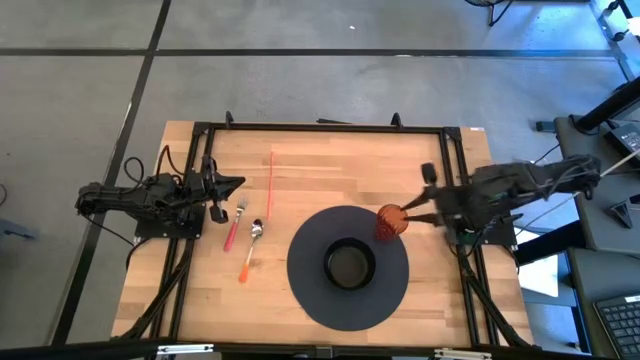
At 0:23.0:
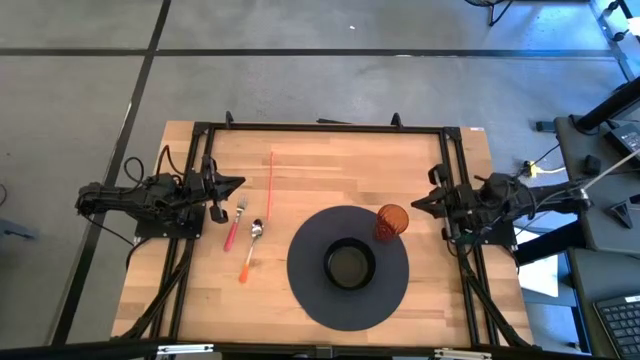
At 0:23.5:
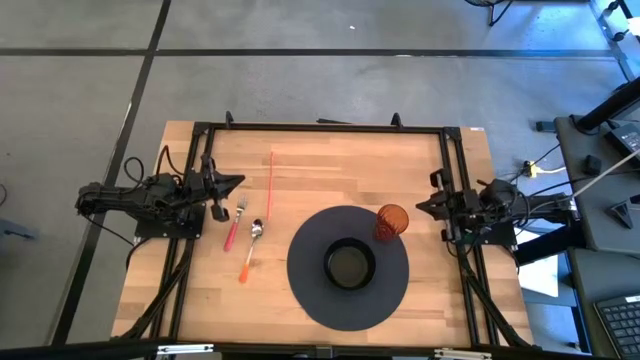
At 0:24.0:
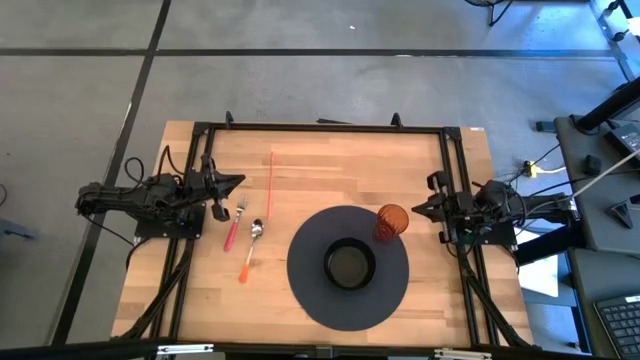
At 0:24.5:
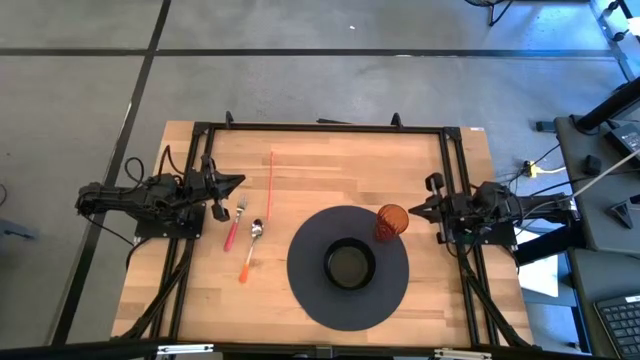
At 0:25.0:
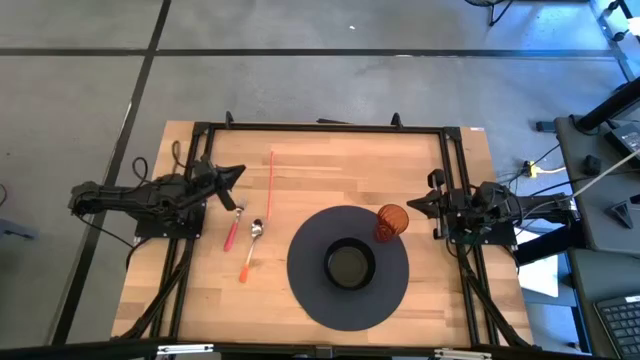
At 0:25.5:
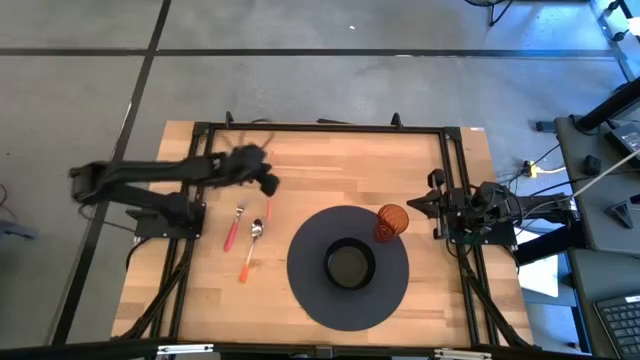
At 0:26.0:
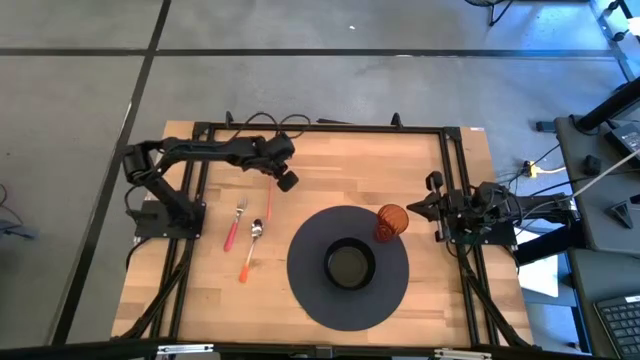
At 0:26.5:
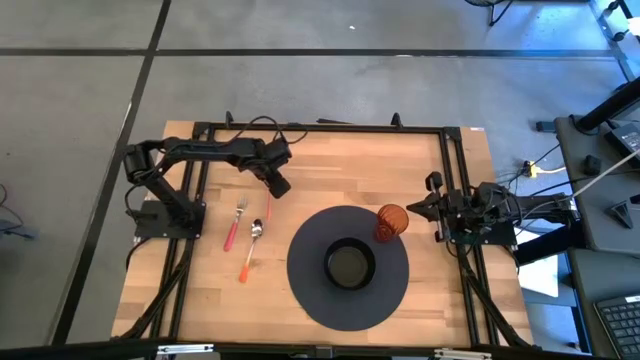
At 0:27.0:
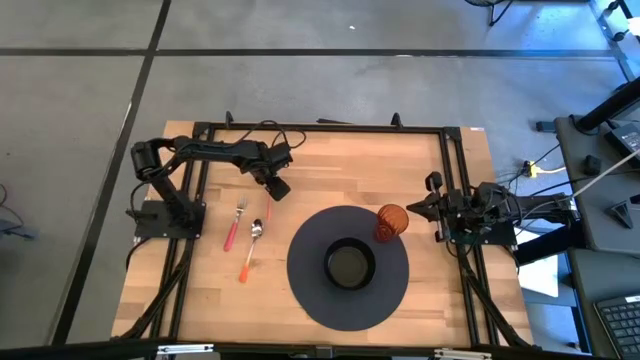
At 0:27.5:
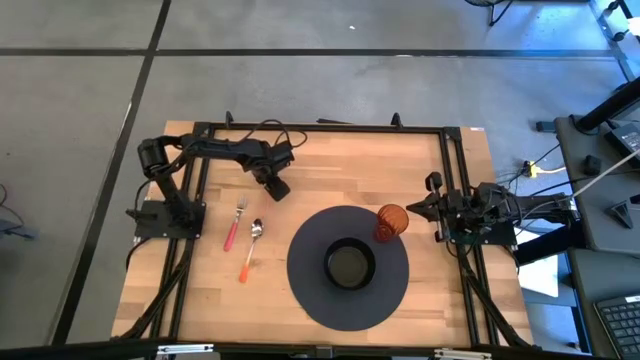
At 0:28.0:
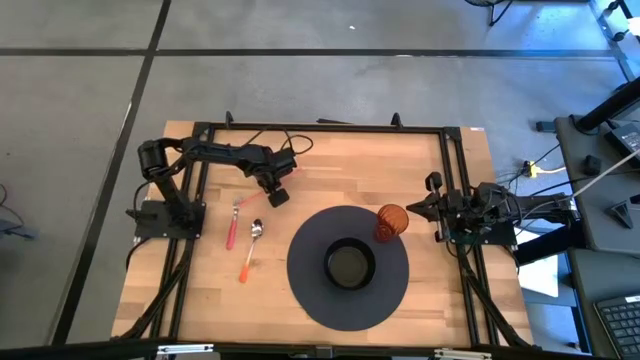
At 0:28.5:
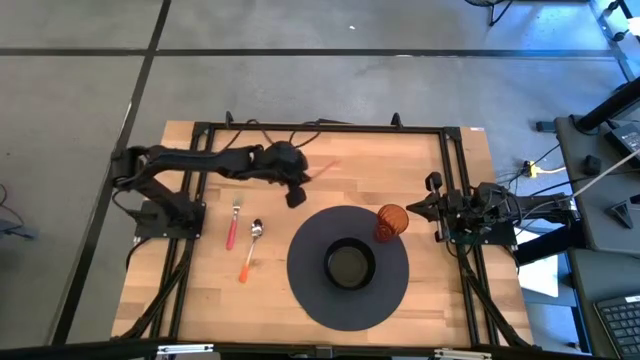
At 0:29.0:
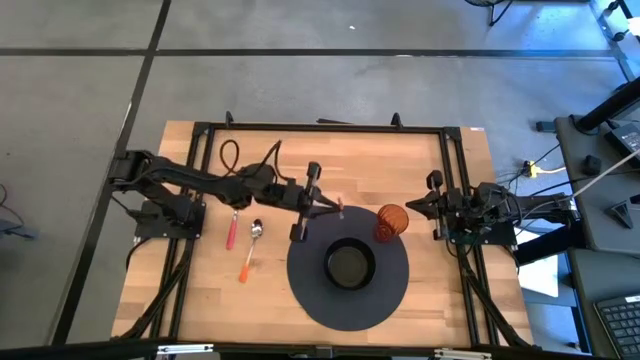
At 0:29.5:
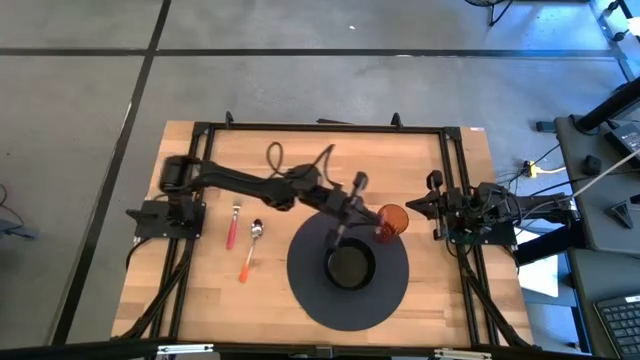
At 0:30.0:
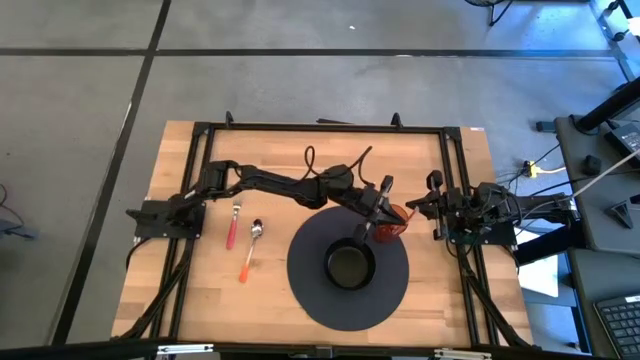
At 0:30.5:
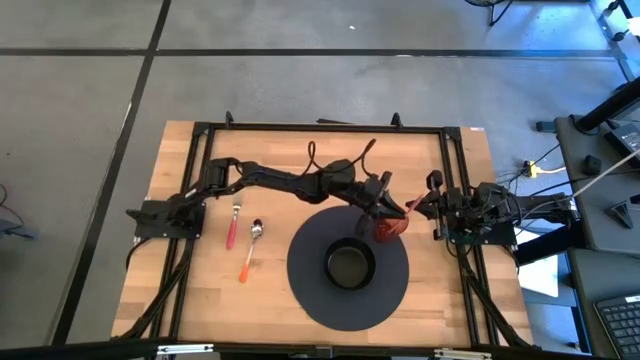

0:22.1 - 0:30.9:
Task: Pick & Place Utensil
Put the red straw into the brown glass

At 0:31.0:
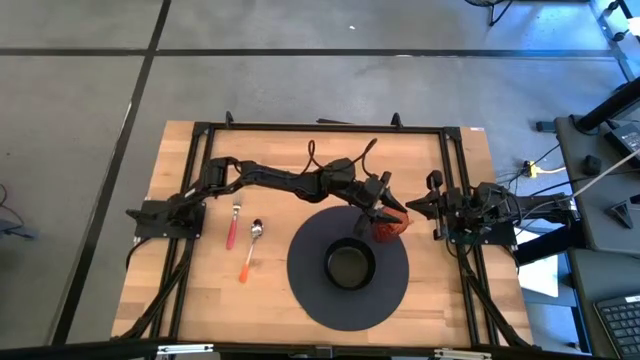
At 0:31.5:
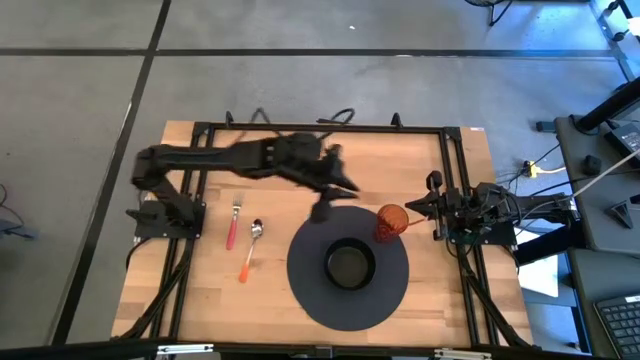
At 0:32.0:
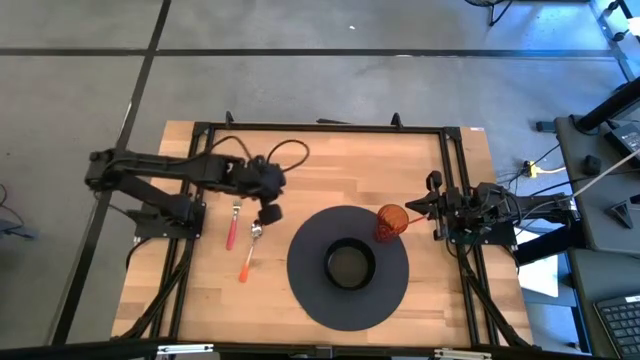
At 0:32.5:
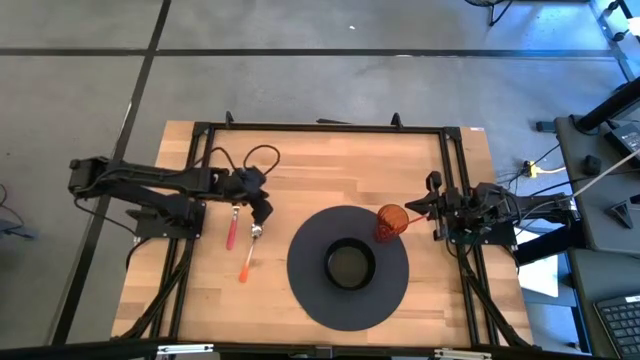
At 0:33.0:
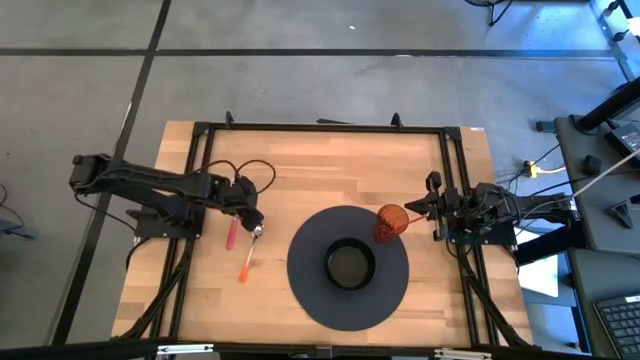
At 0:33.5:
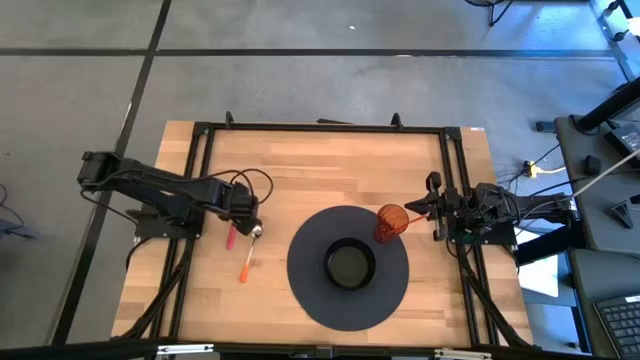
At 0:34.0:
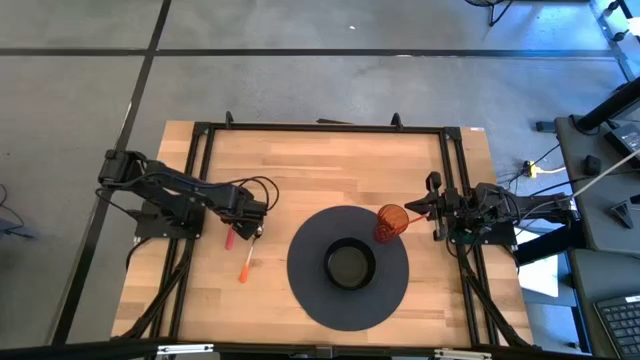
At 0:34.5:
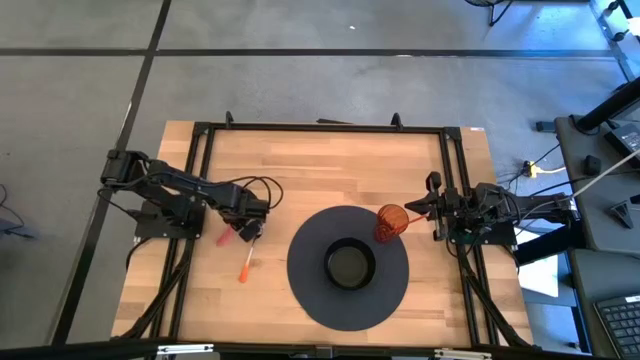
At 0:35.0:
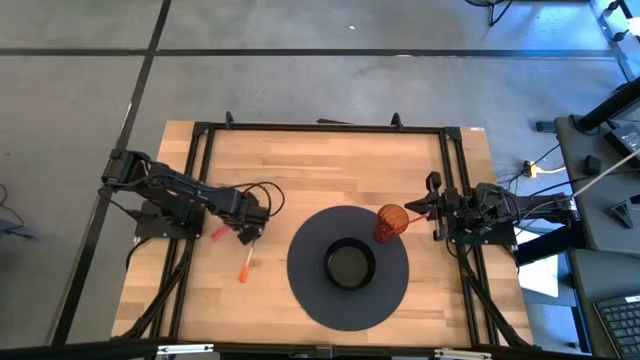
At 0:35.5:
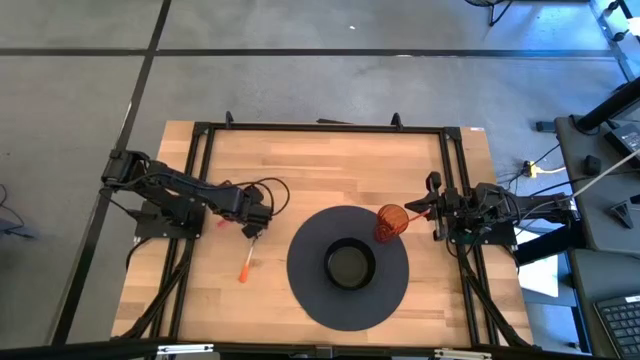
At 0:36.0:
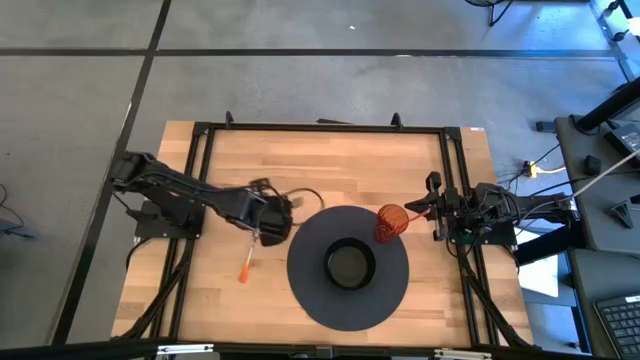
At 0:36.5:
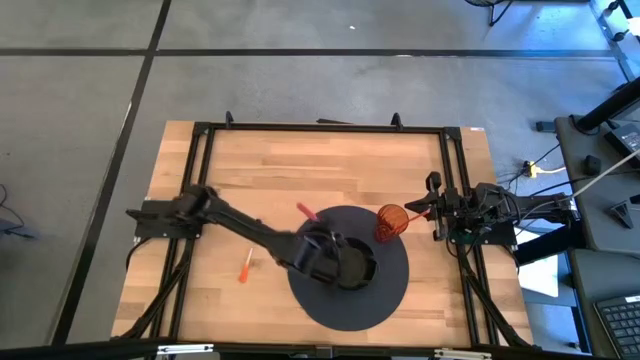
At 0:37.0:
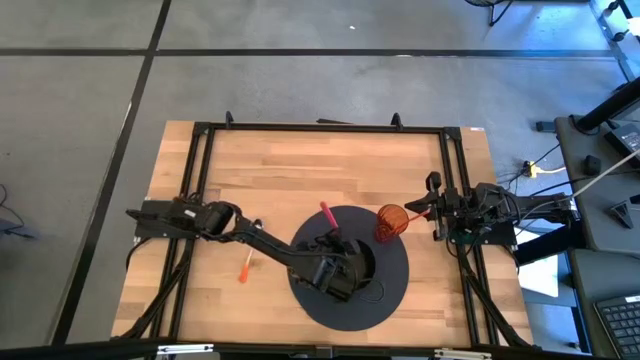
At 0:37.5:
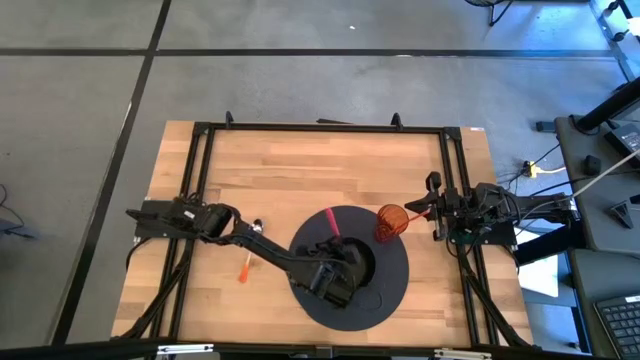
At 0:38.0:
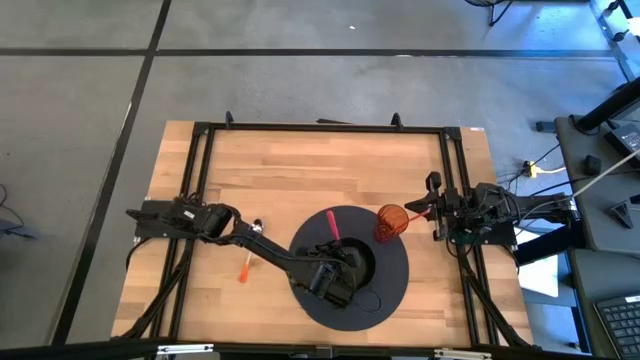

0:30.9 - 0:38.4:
Put the pink fork into the black bowl

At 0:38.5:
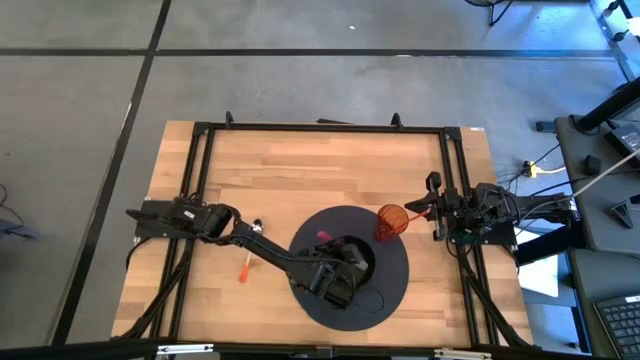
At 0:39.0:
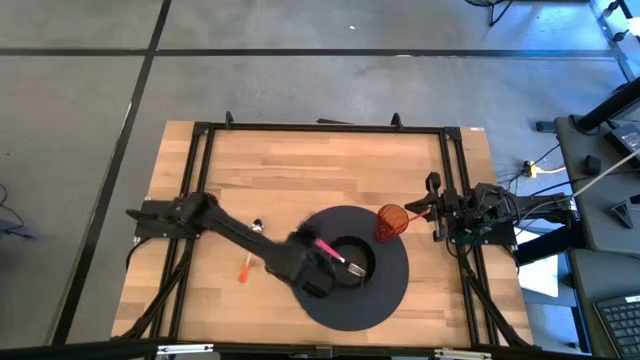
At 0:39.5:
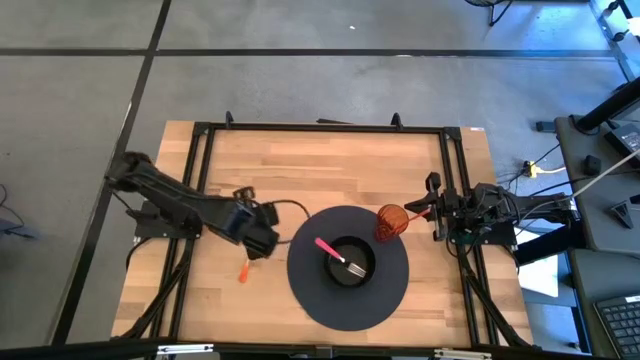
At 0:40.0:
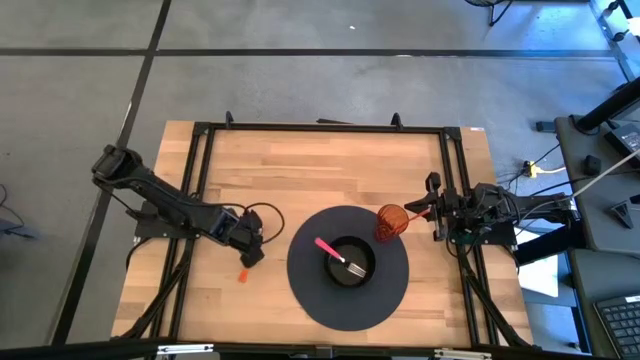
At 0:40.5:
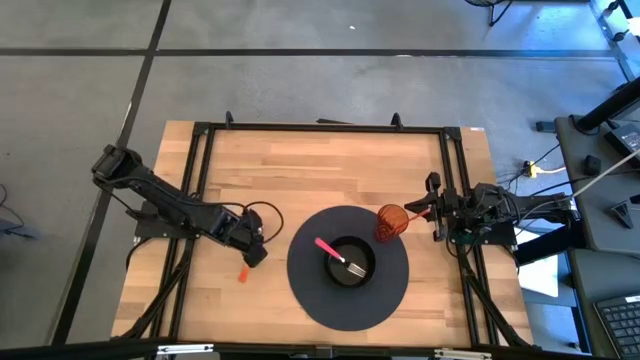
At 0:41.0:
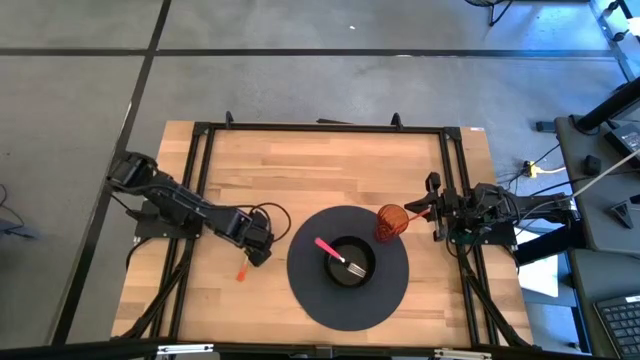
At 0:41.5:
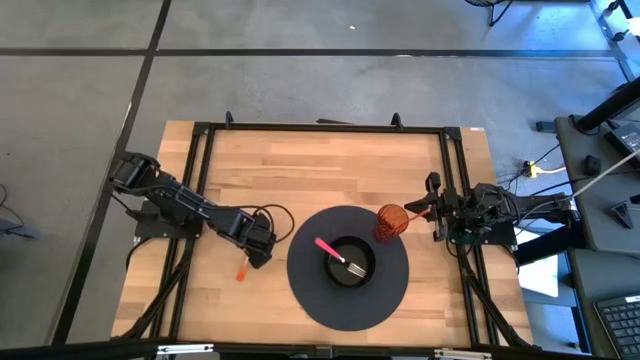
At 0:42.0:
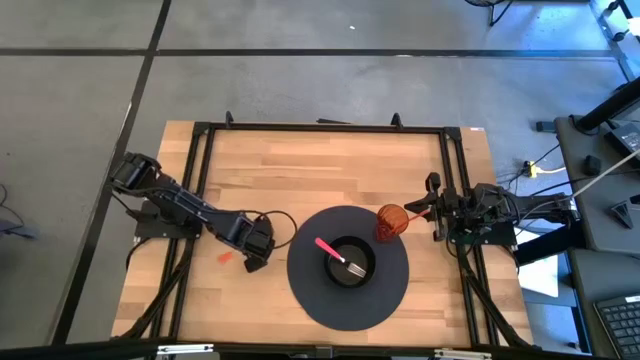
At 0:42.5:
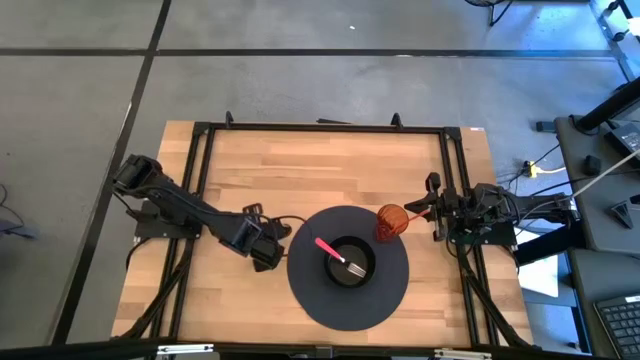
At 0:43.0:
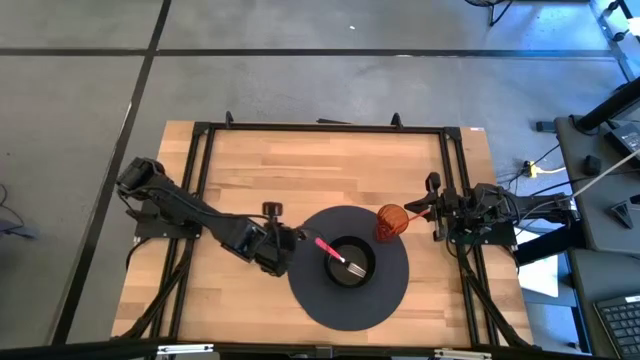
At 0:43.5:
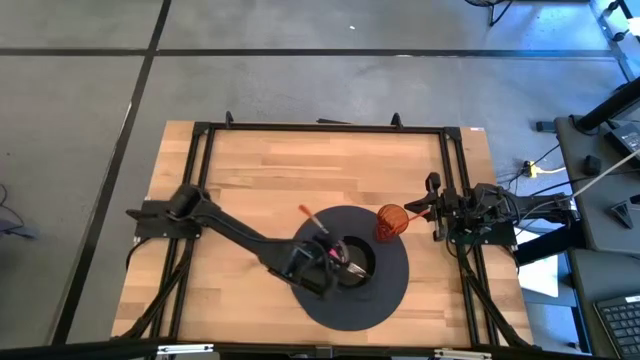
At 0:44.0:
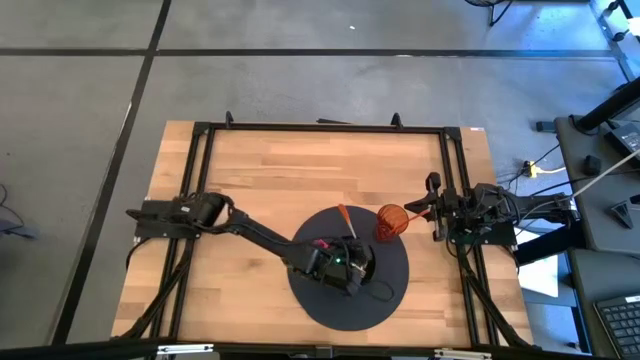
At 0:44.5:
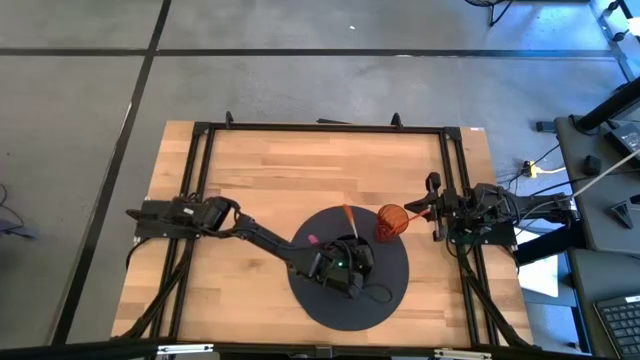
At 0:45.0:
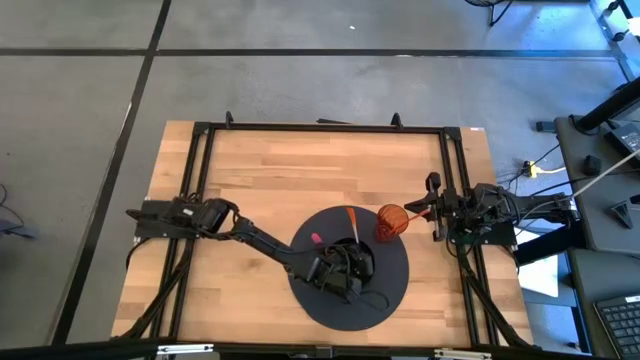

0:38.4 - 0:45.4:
Put the orange spoon into the black bowl
